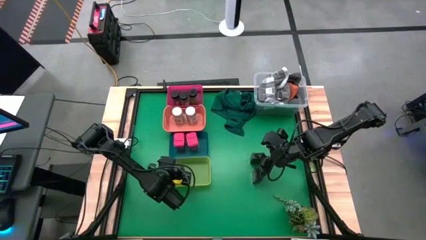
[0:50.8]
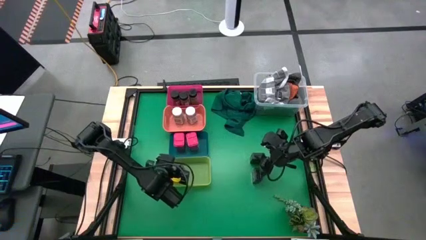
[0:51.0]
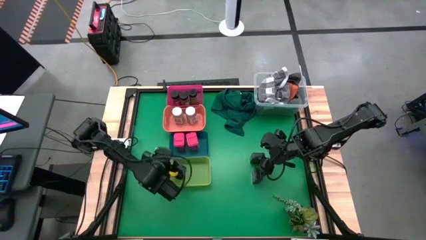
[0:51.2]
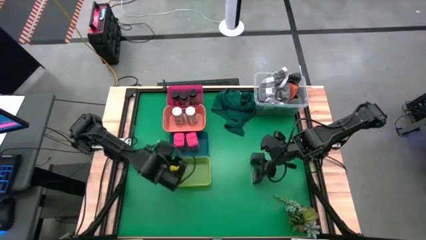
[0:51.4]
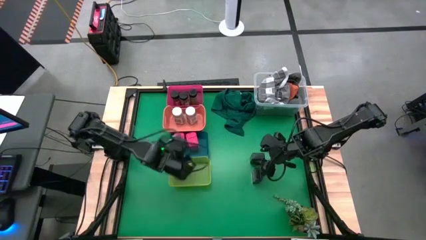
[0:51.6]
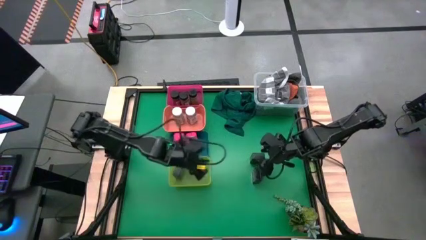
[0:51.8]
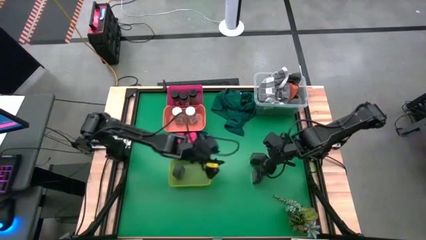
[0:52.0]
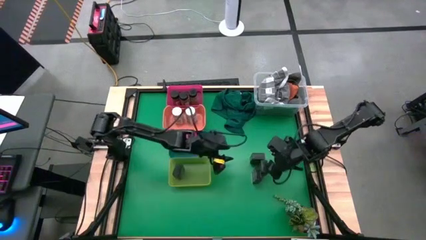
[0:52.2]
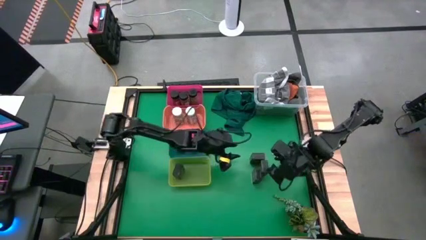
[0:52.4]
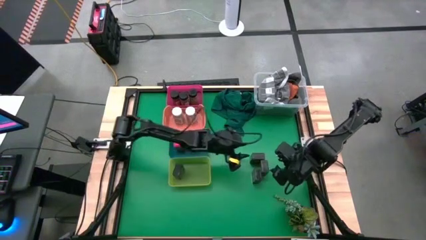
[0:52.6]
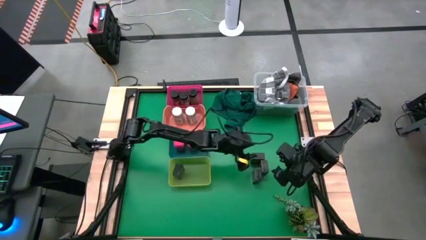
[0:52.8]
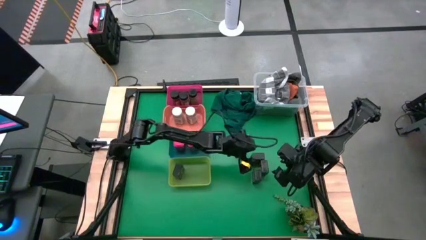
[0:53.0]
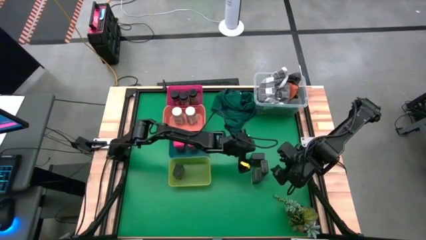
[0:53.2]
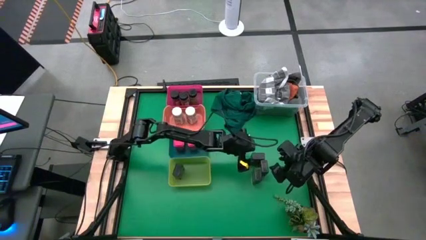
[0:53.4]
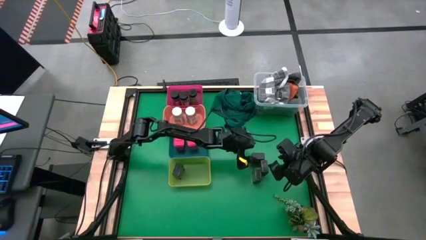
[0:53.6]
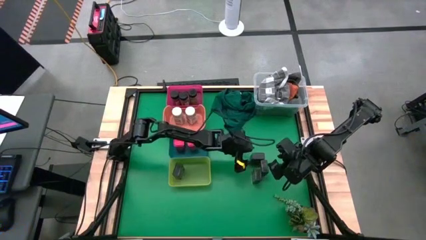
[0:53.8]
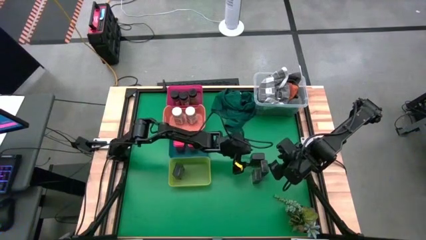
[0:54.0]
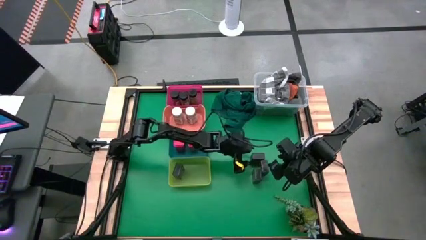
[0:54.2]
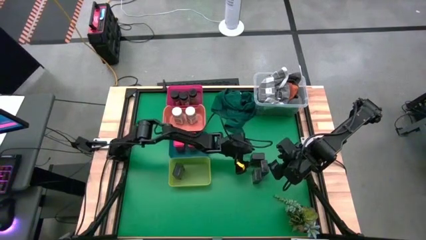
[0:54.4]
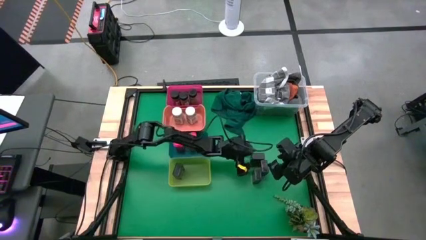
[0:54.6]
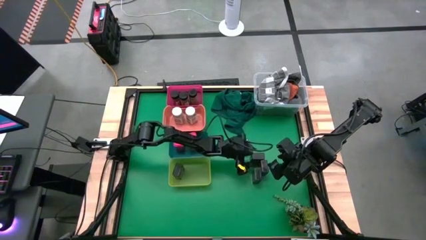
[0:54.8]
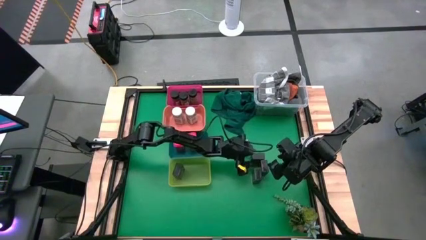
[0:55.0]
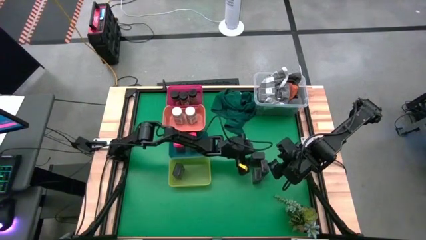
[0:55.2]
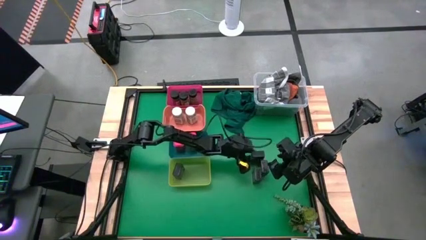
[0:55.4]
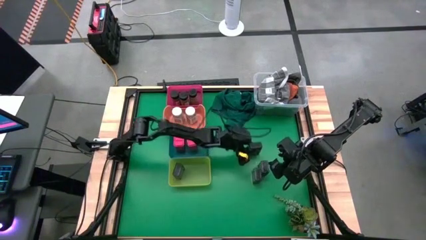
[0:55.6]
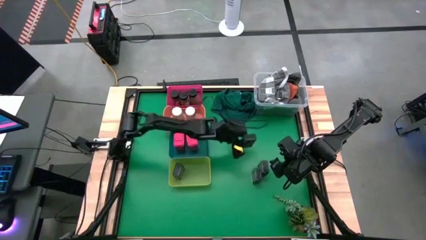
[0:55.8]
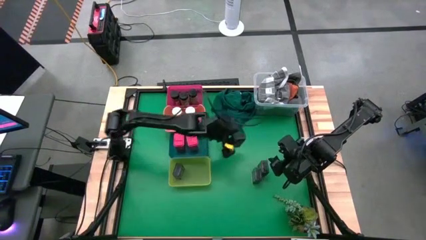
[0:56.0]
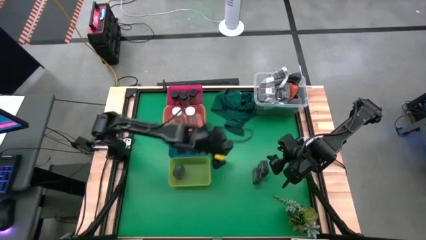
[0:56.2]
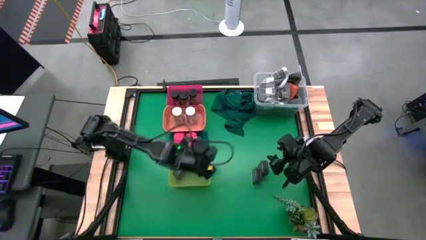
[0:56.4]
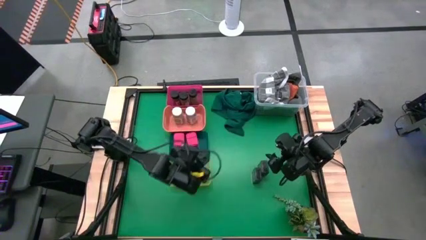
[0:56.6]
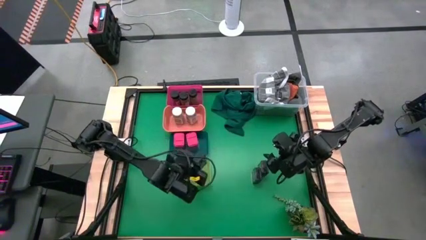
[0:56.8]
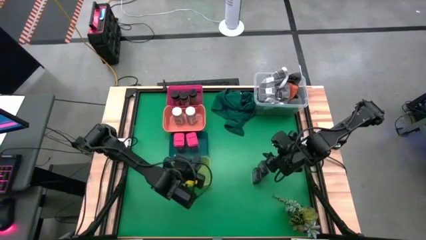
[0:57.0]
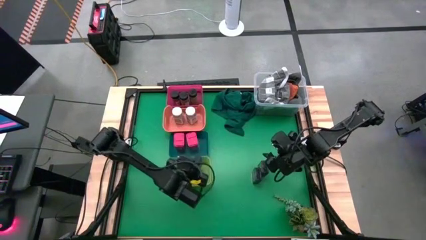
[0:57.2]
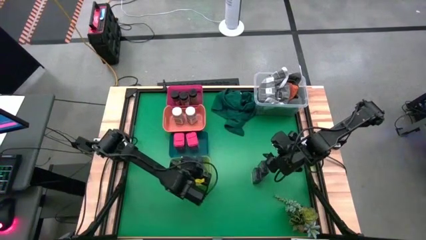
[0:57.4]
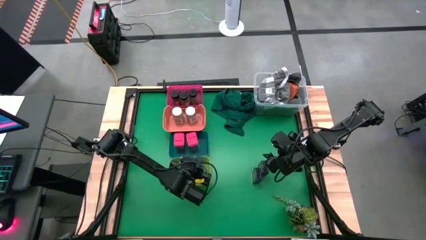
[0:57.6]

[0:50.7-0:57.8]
Task: Sort spices by type
Put the top black spice can into the yellow bin

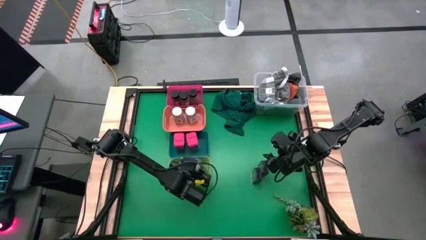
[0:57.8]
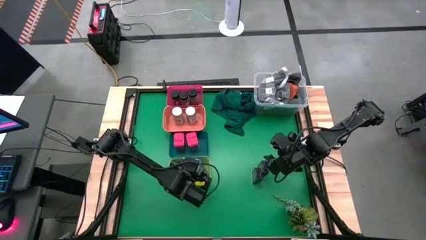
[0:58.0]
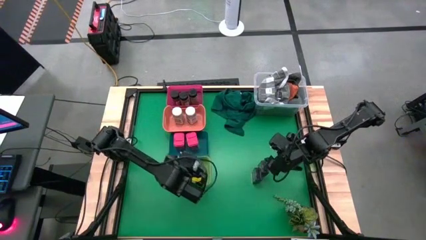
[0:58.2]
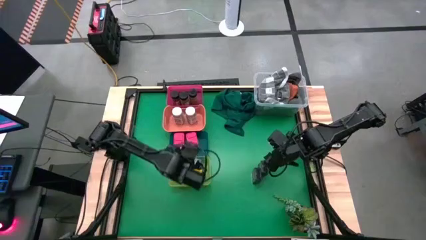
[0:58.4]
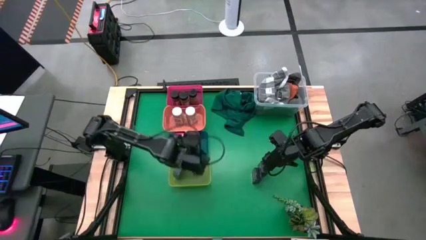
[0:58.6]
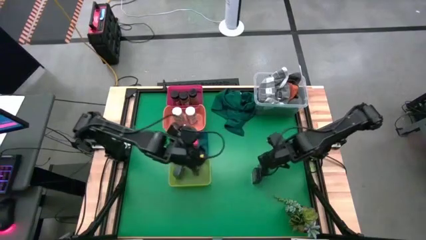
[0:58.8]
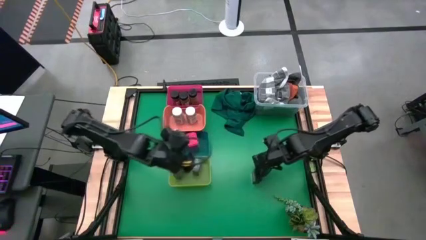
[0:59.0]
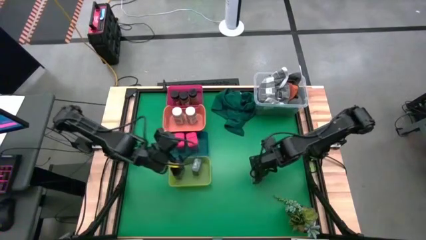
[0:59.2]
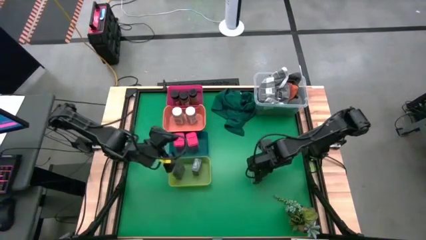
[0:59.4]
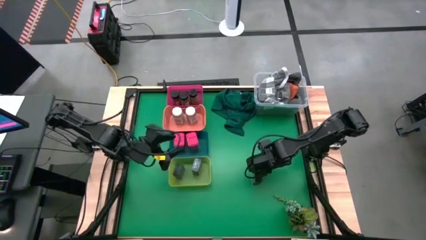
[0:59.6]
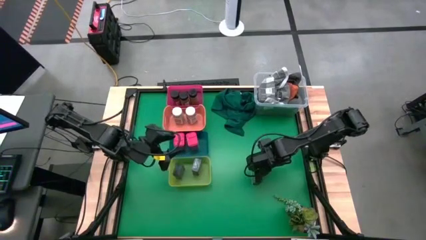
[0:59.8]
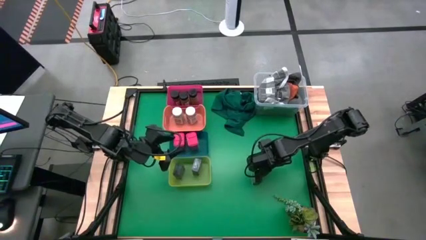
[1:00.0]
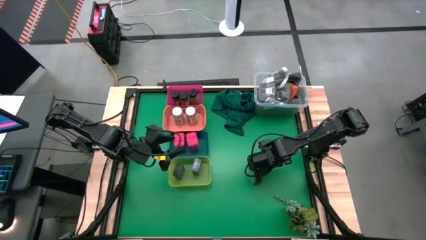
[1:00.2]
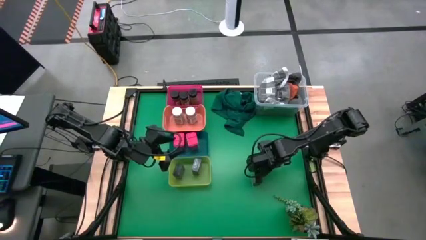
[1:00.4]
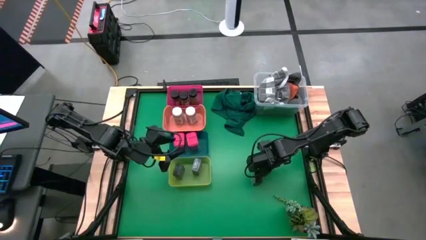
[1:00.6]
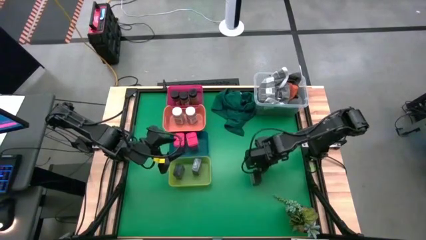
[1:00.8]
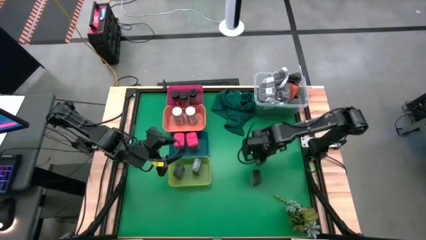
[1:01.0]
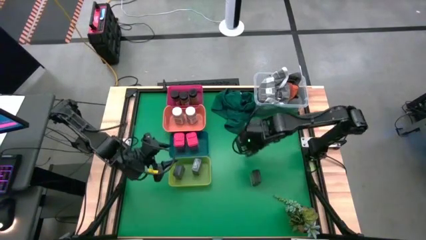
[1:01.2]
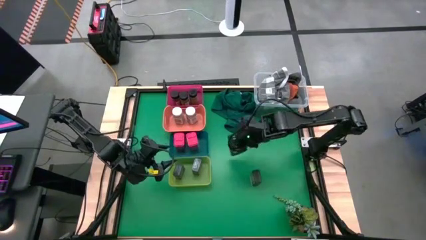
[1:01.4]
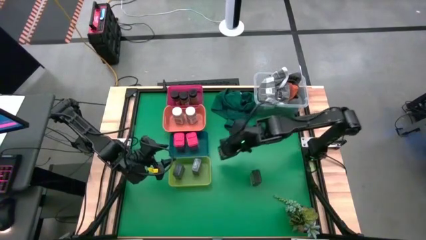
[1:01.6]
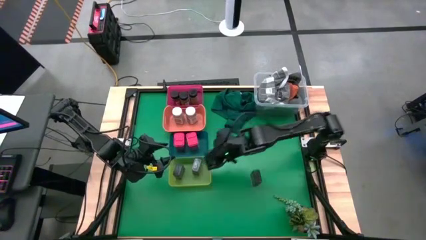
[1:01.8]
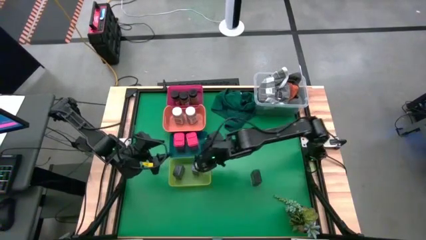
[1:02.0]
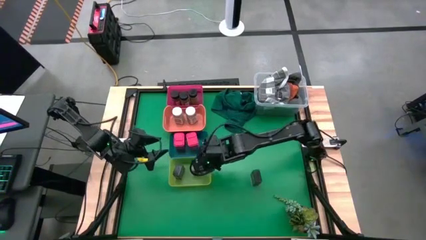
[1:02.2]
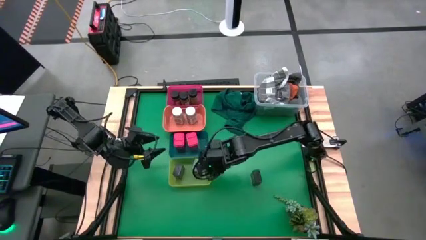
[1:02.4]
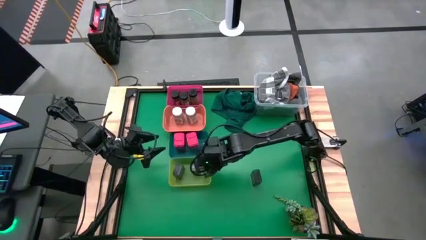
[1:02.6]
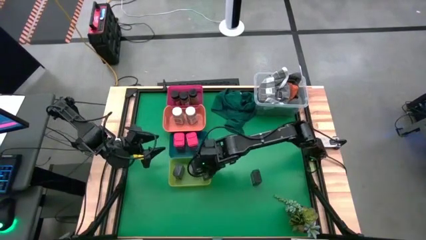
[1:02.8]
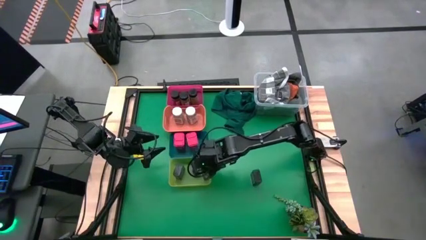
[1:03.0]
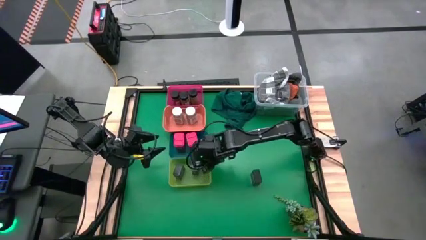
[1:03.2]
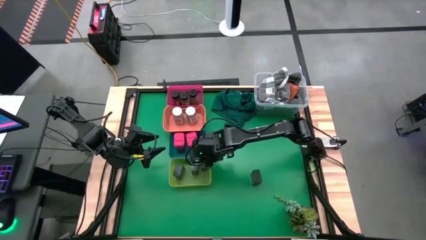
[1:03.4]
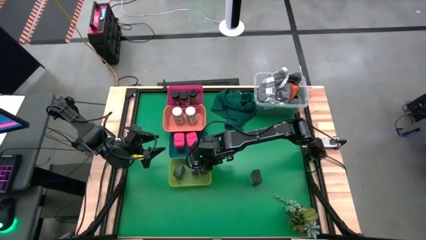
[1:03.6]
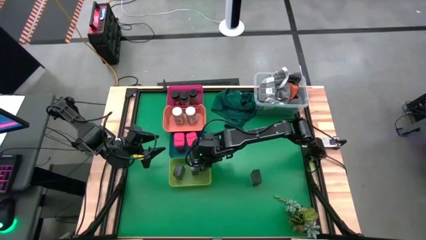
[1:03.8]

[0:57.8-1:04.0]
Put the right black spice can into the yellow bin

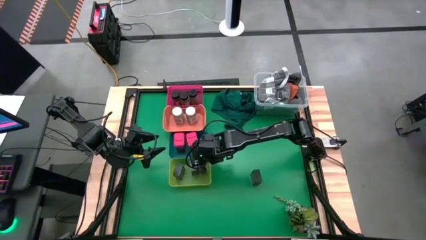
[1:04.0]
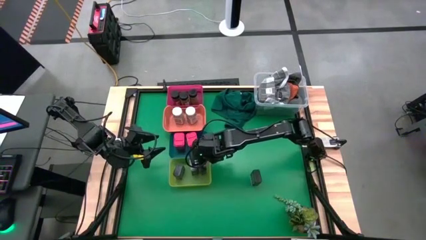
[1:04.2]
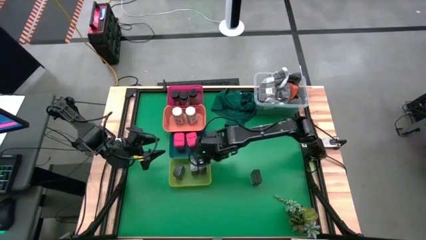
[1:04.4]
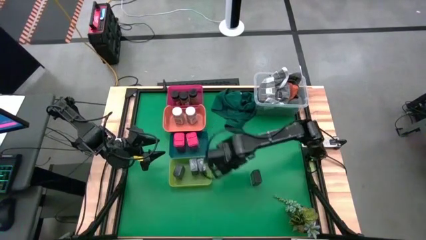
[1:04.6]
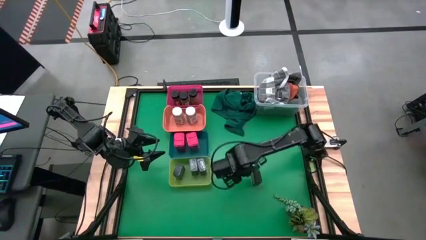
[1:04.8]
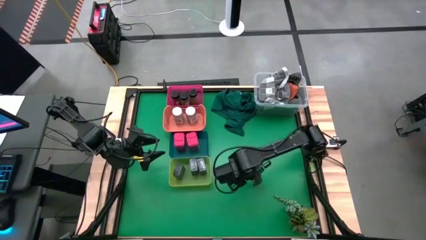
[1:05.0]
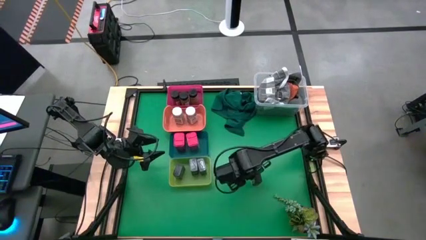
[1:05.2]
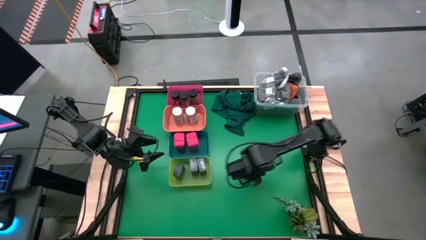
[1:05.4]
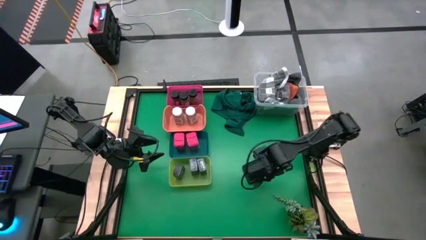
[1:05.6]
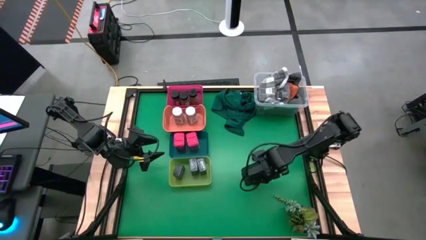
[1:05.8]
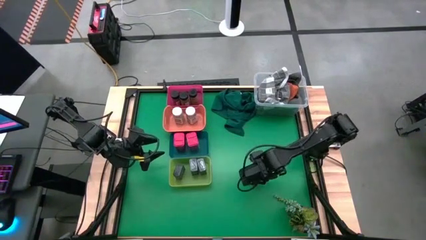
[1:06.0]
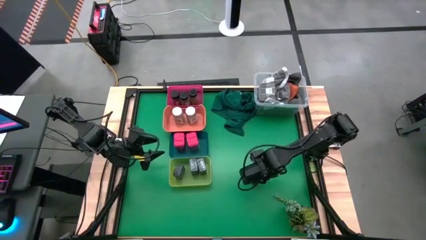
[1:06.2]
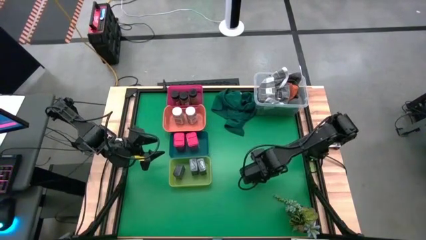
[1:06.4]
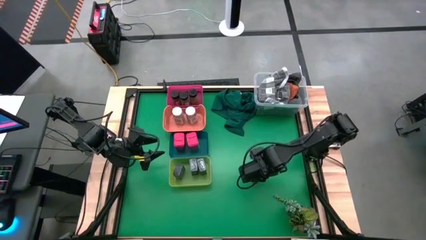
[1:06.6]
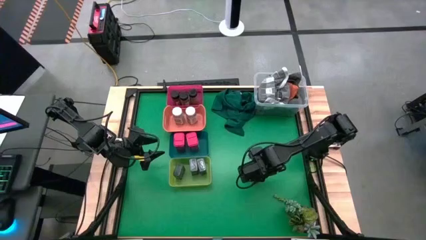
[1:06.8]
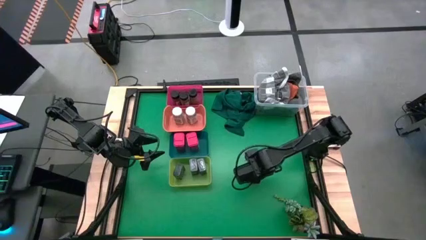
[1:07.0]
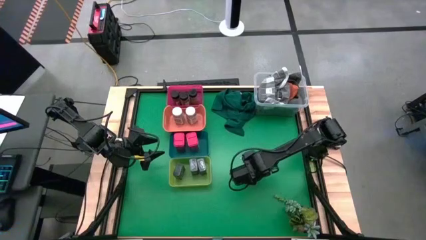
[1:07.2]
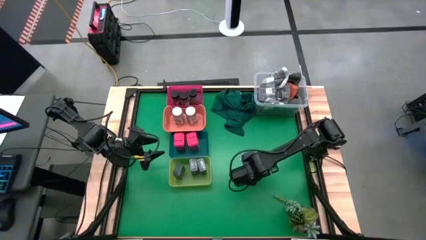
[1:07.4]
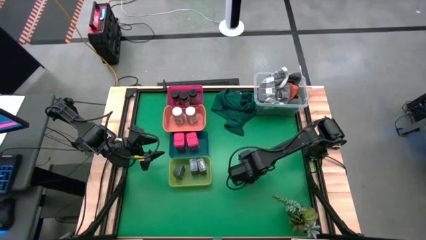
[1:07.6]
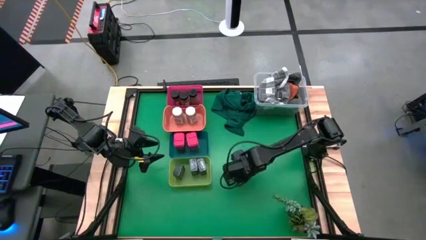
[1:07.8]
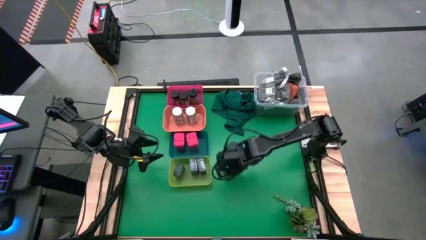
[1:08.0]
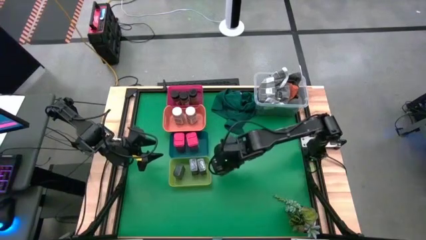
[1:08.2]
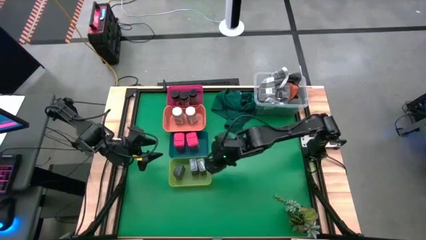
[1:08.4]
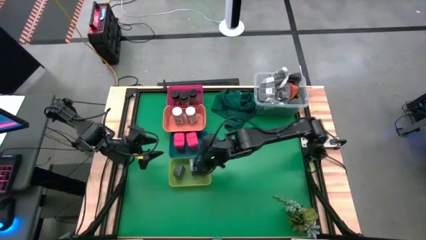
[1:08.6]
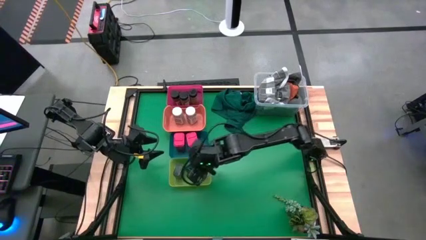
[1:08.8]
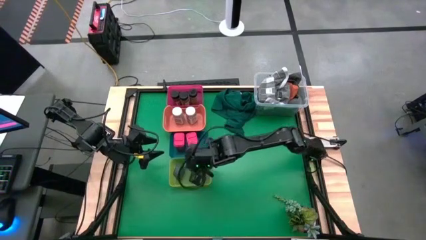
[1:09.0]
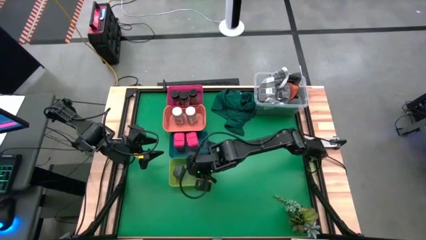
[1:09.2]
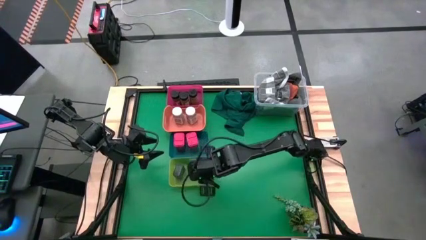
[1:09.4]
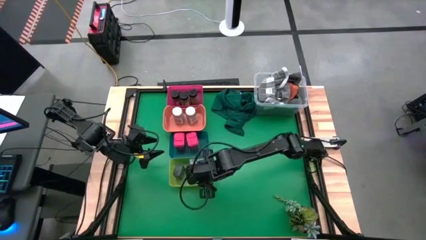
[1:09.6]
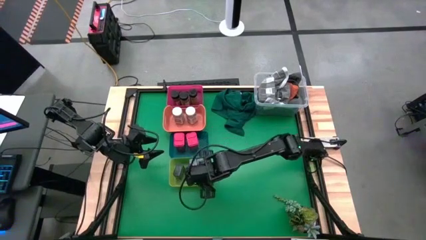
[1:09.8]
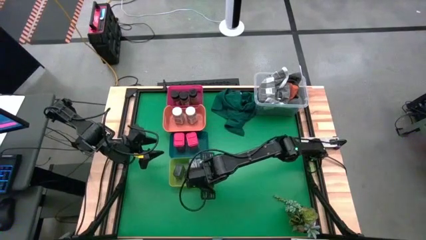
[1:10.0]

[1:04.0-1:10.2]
Put the black spice can into the yellow bin
